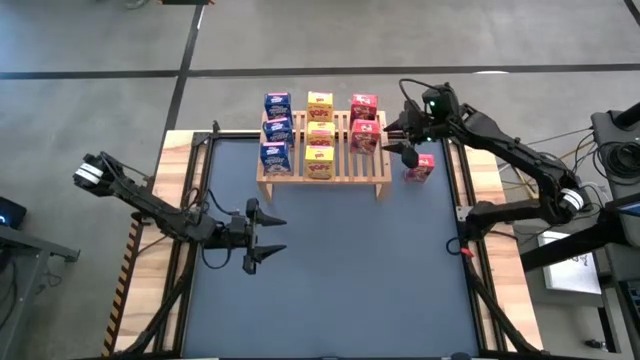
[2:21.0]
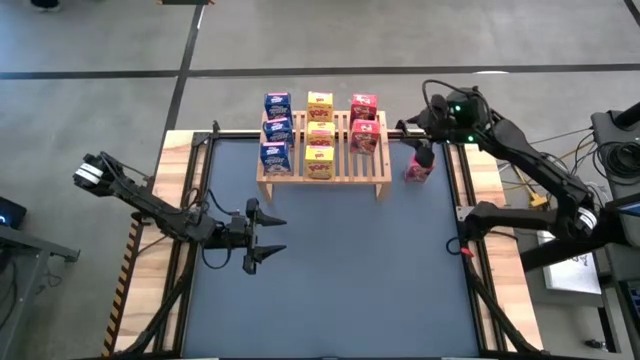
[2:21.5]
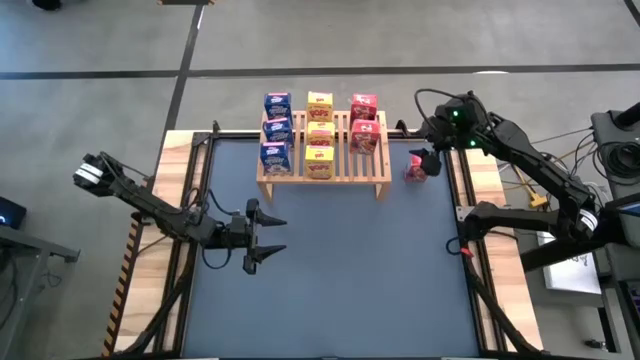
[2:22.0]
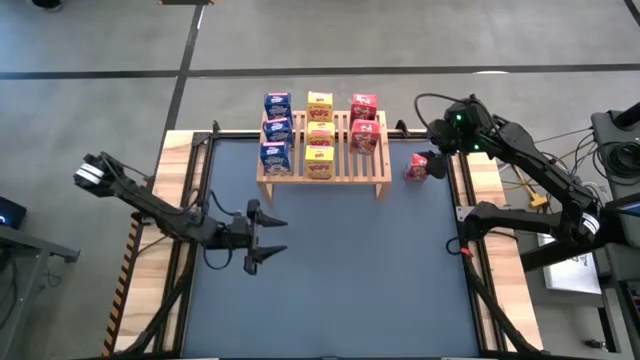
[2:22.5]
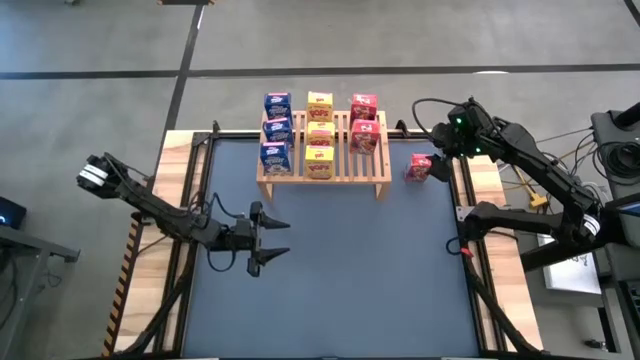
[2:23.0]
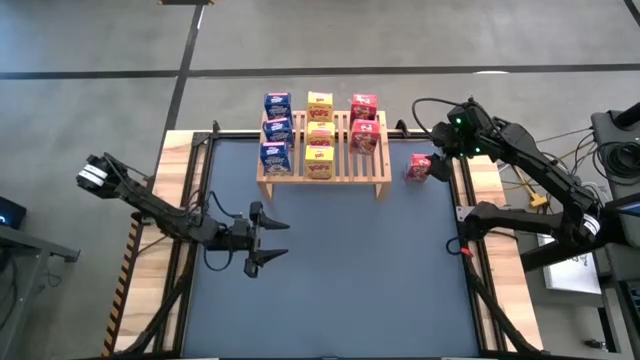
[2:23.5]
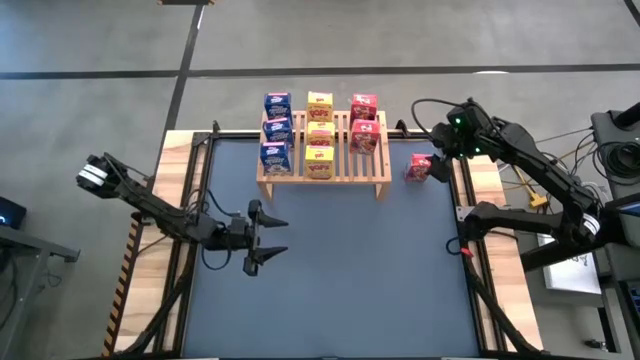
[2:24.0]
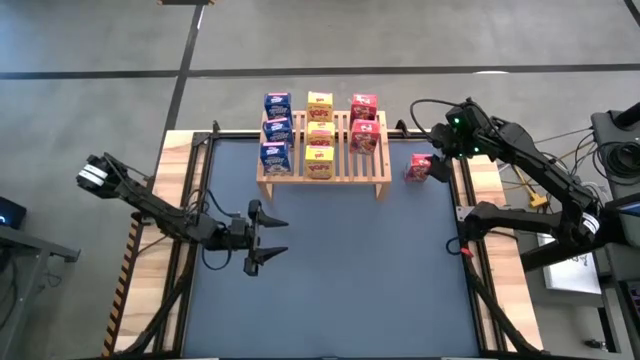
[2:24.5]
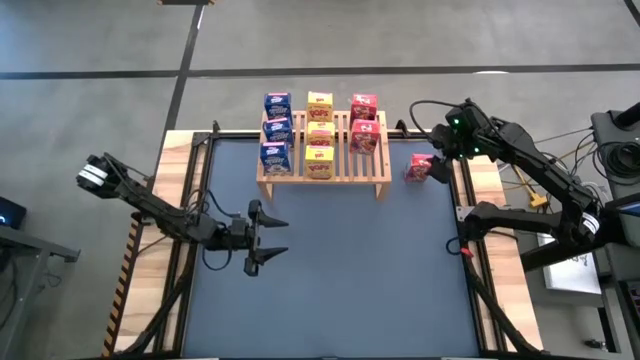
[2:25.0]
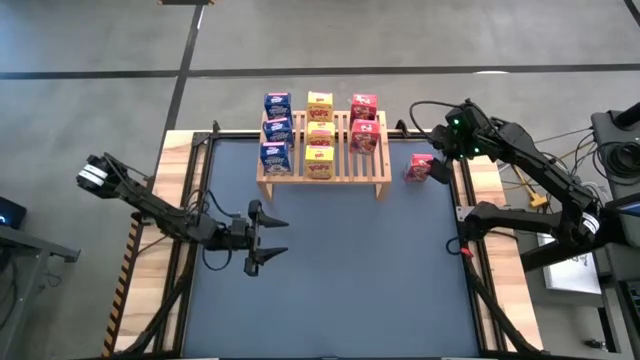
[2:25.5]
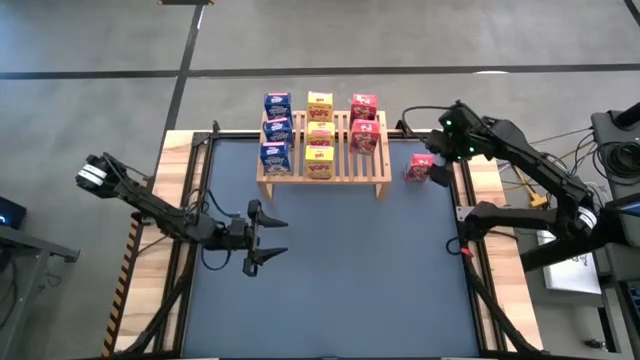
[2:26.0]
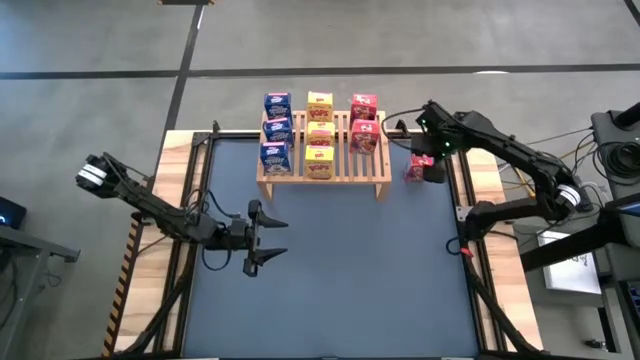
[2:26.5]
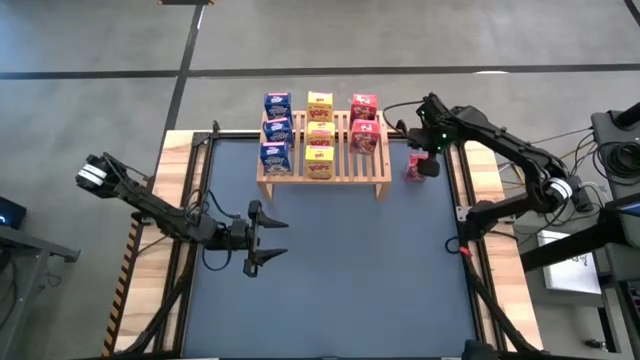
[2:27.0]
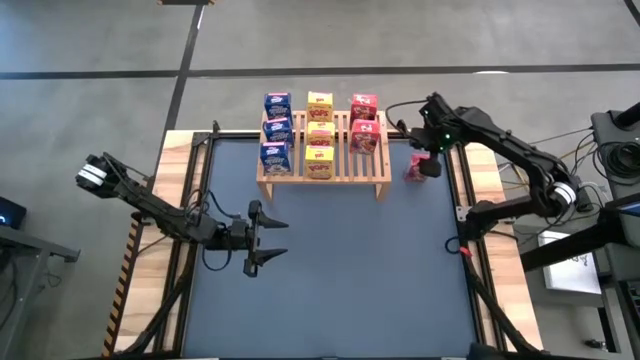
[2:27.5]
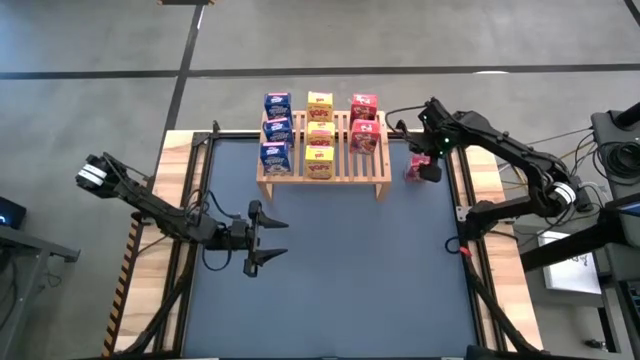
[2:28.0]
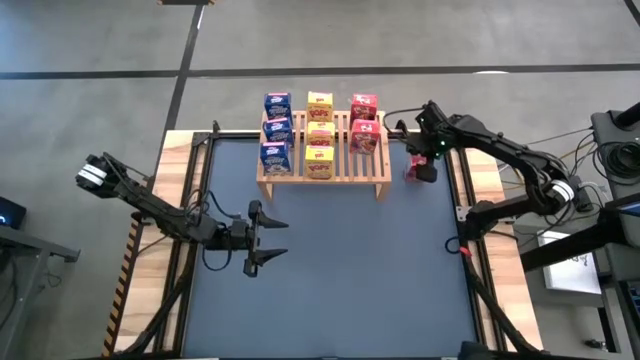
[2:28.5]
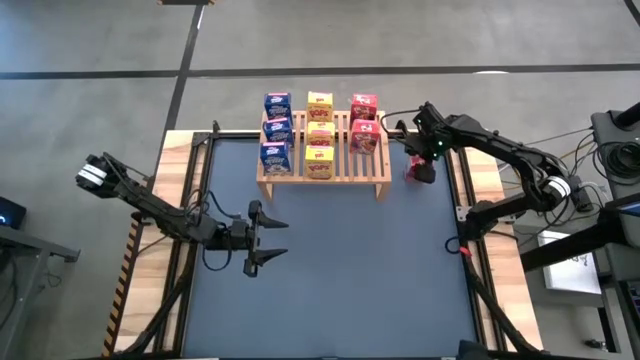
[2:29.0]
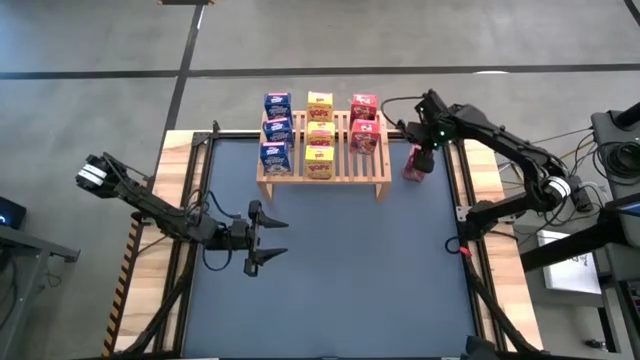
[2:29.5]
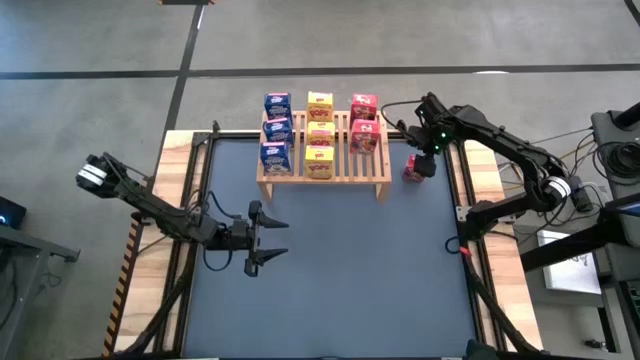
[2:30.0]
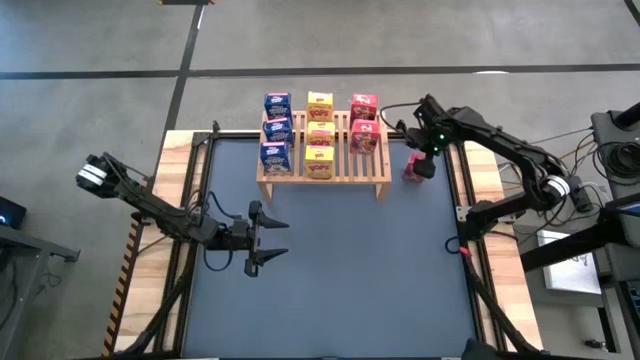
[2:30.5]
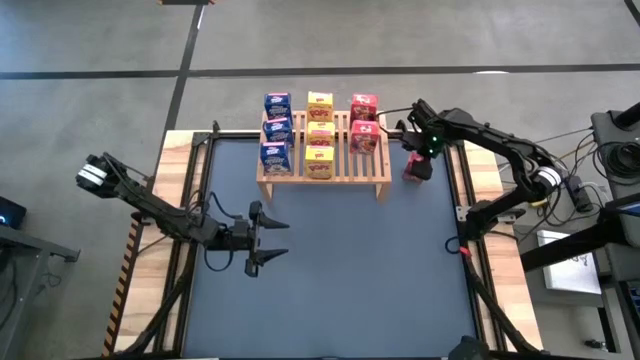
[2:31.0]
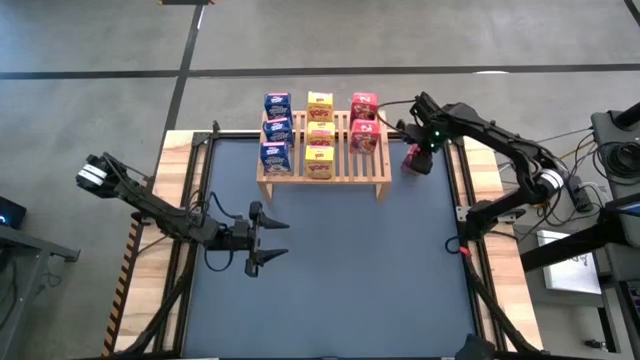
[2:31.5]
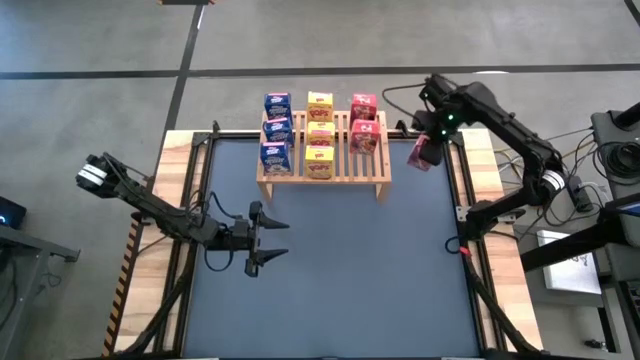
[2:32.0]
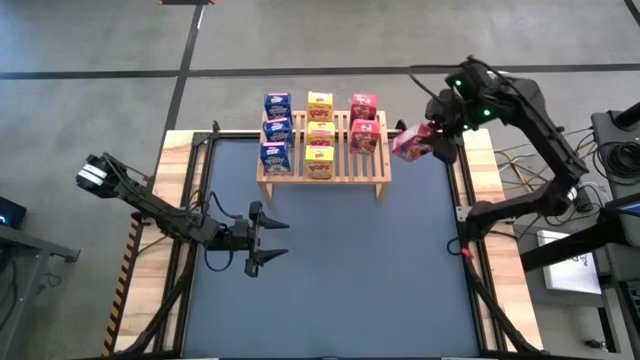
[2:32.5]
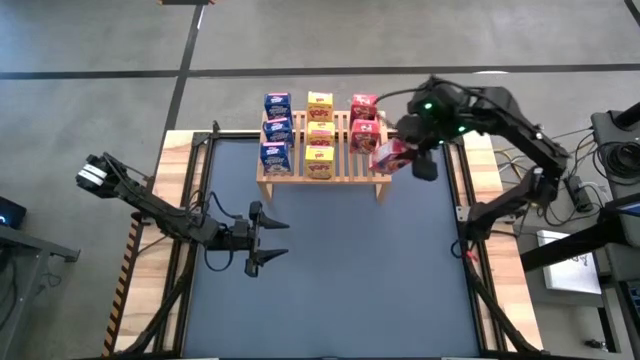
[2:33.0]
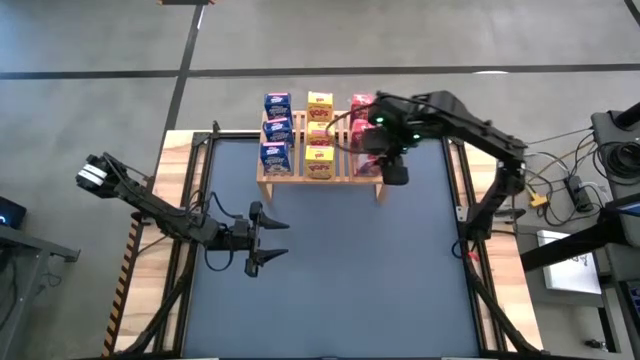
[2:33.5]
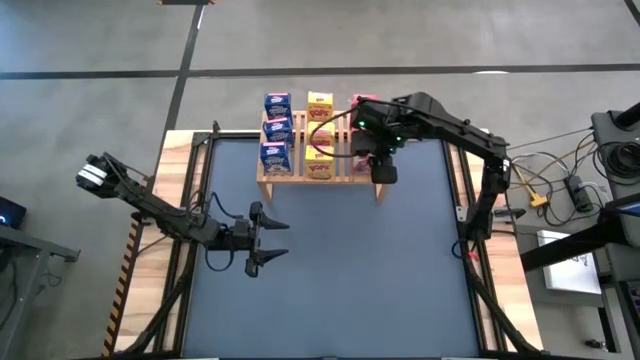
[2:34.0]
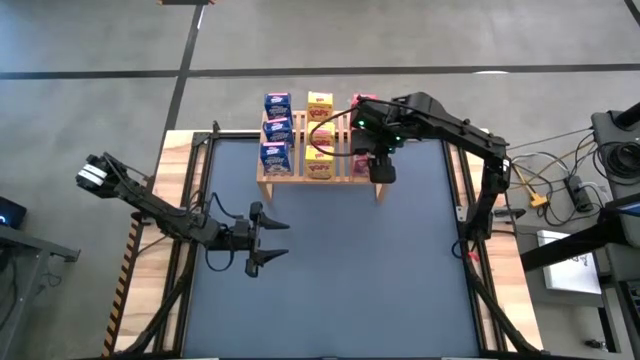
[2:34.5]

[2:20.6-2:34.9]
Task: Stack cereal on shelf
Put the red cereal box on the shelf aligned with the other red cereal box

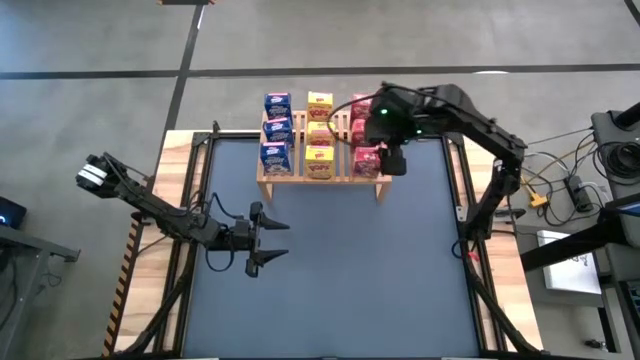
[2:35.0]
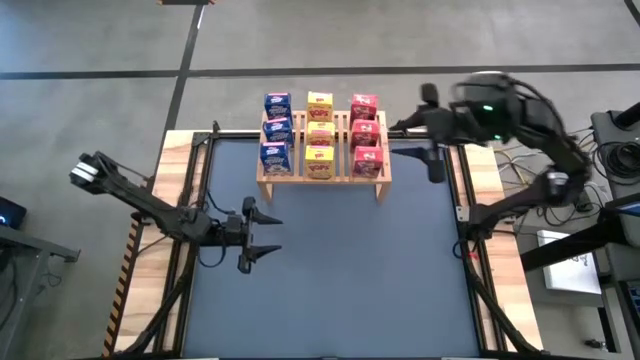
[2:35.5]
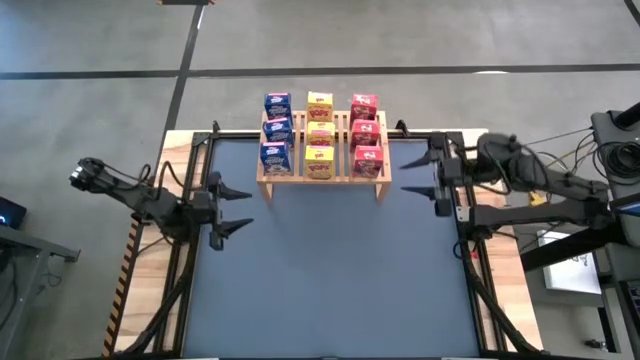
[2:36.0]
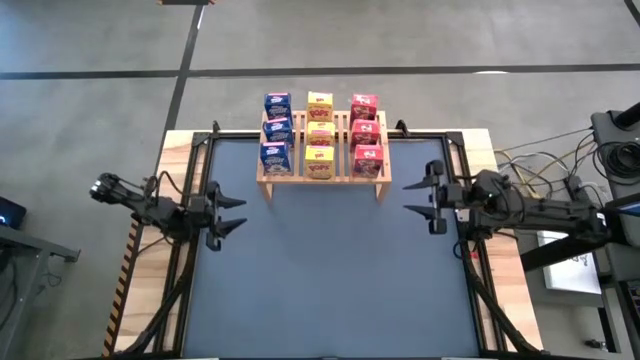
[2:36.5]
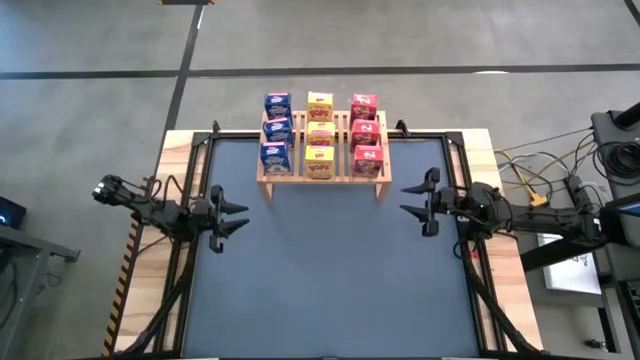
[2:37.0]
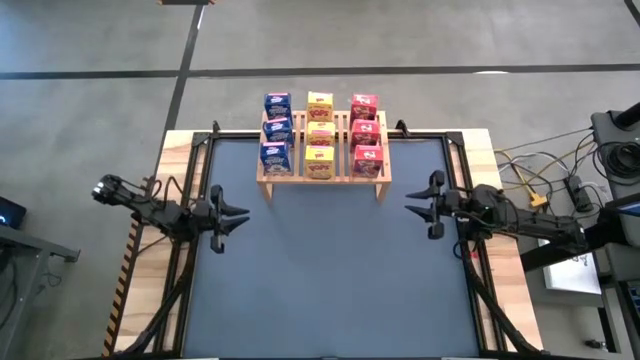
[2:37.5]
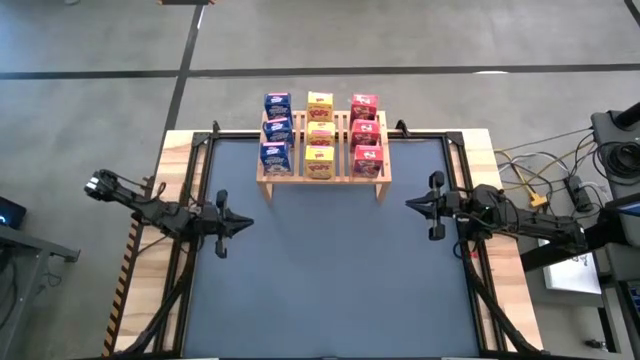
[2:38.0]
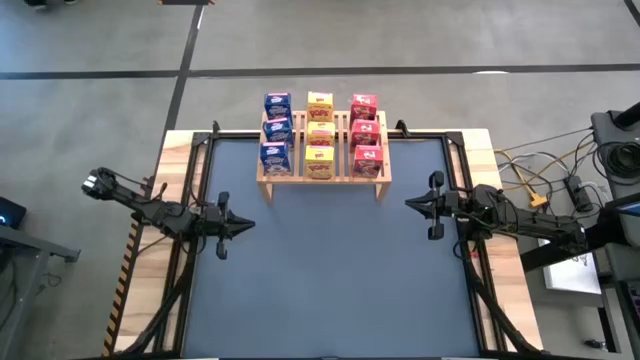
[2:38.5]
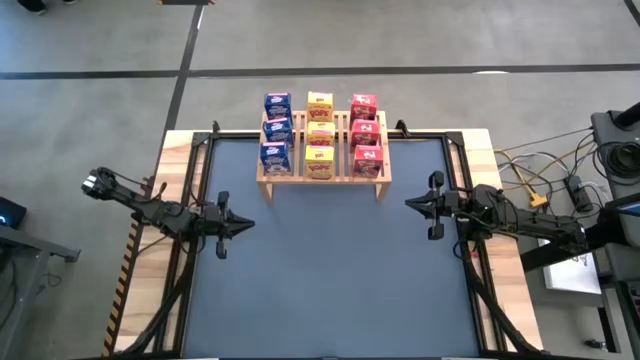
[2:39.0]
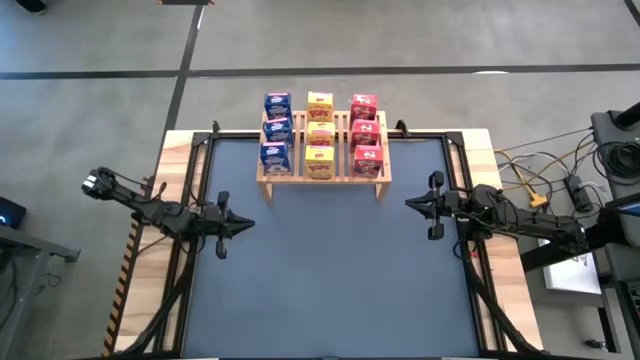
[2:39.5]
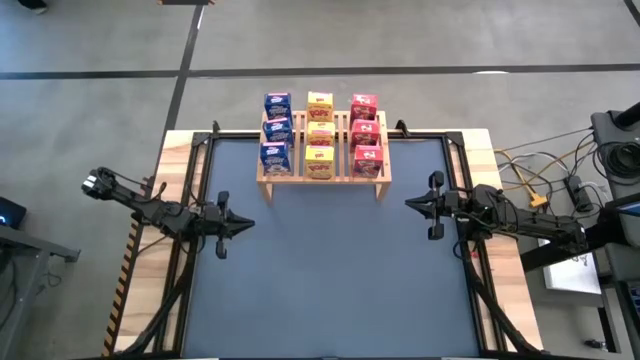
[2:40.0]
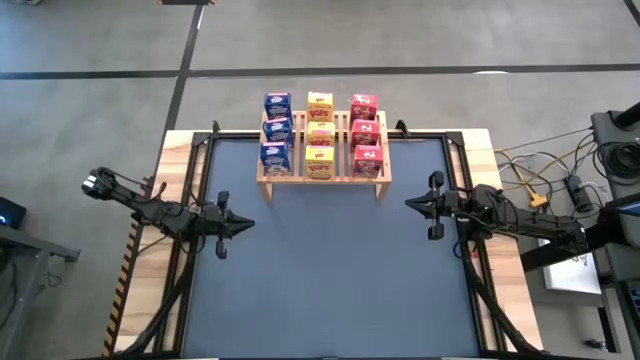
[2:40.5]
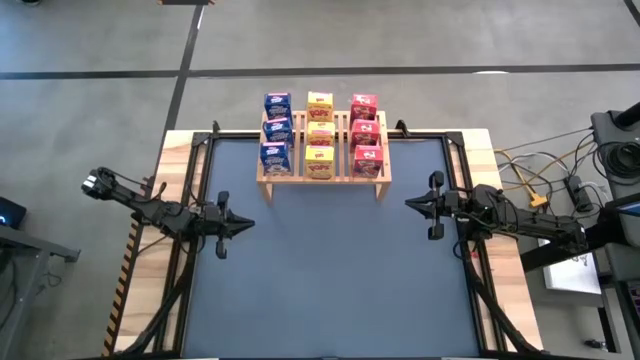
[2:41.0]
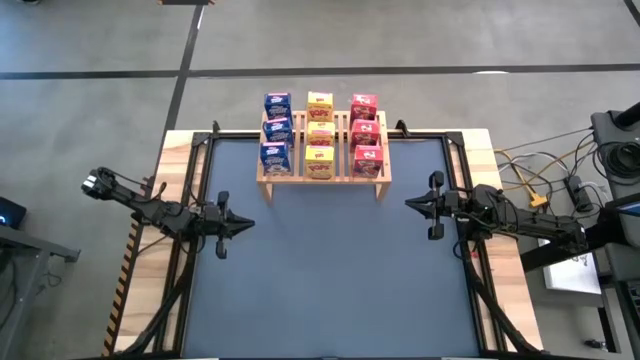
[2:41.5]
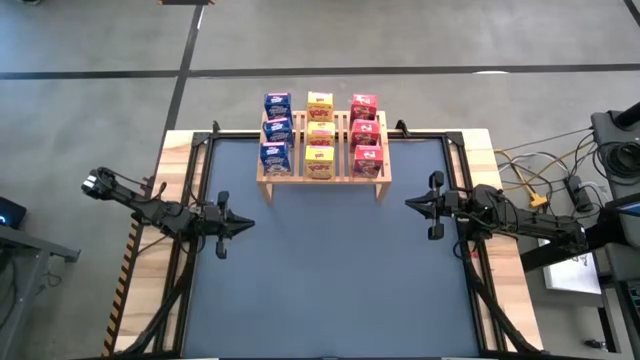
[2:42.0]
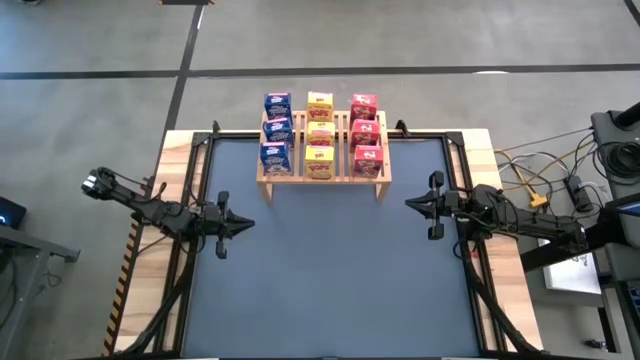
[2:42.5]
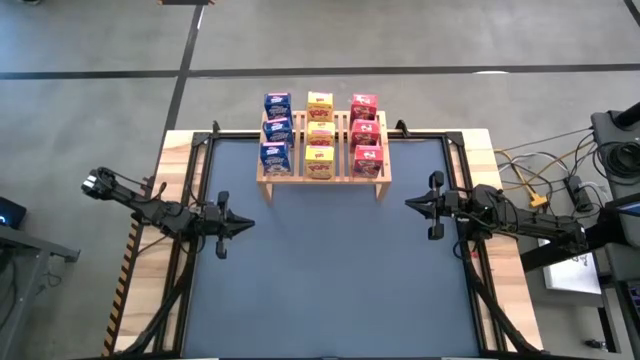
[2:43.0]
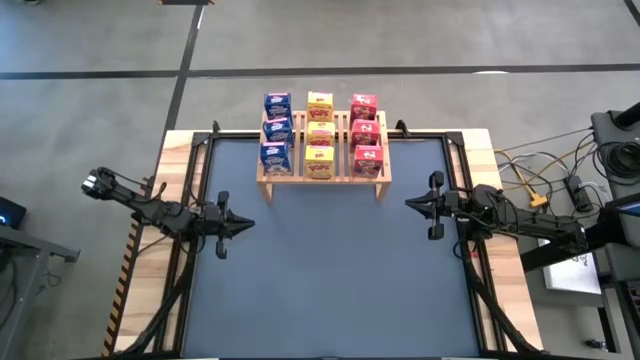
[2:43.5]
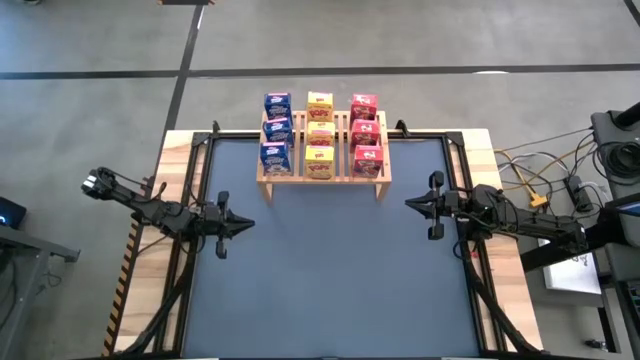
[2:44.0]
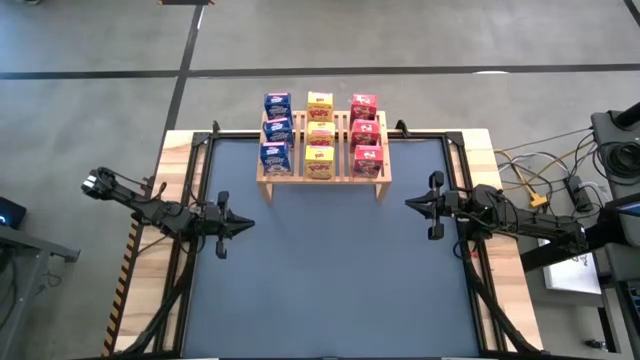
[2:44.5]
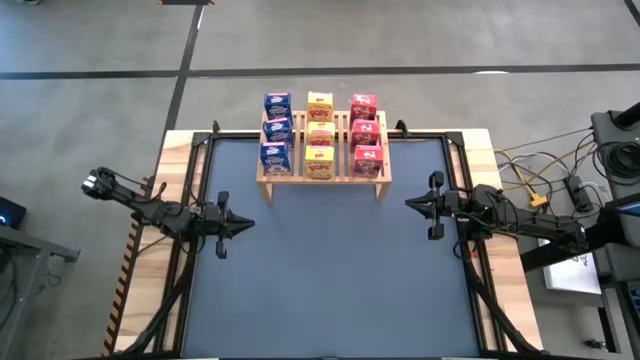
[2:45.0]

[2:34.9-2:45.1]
Return to Home Position
